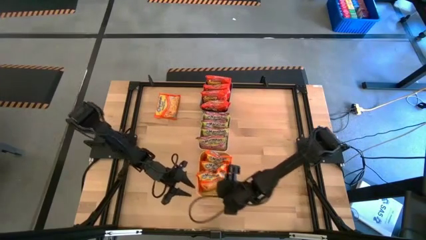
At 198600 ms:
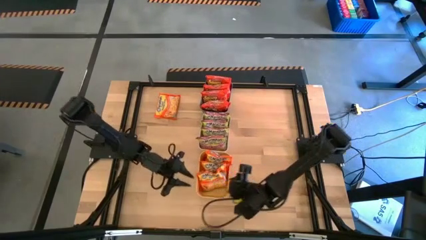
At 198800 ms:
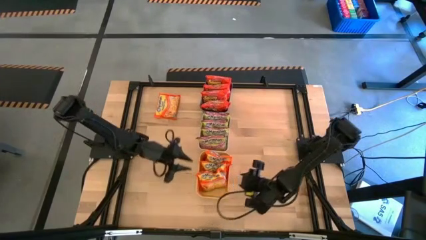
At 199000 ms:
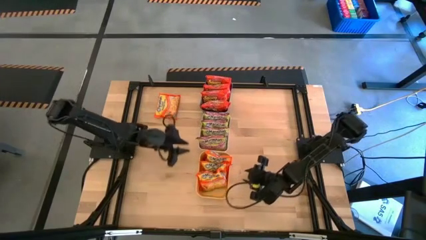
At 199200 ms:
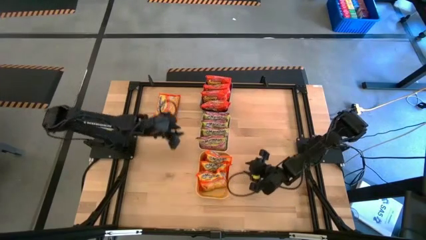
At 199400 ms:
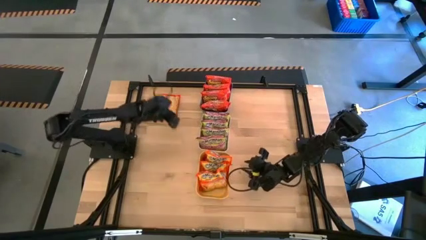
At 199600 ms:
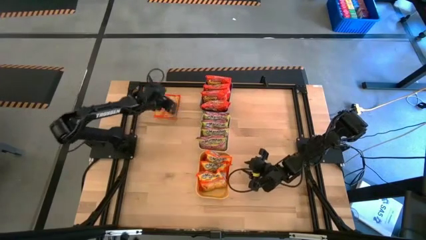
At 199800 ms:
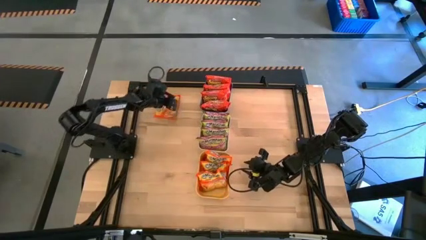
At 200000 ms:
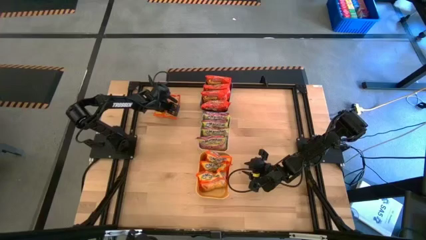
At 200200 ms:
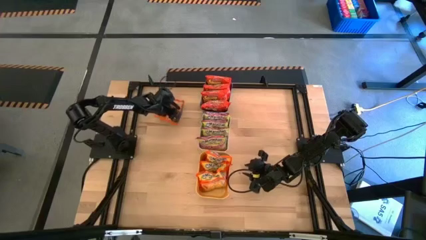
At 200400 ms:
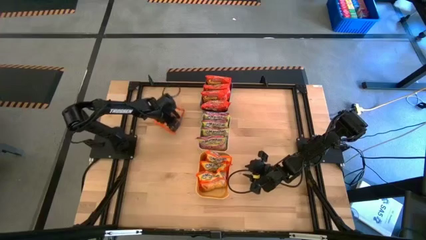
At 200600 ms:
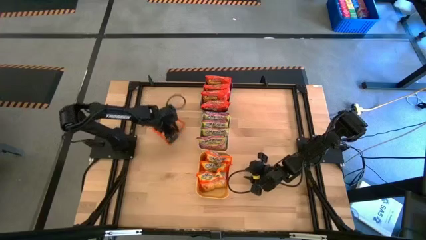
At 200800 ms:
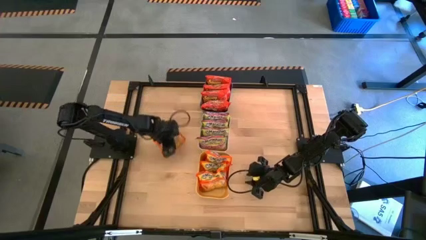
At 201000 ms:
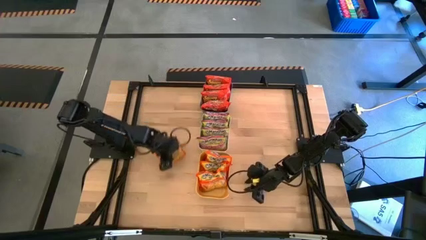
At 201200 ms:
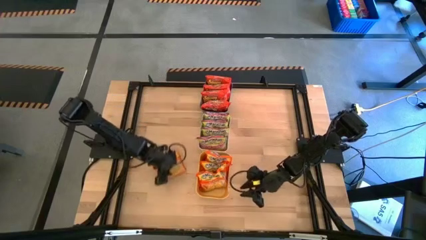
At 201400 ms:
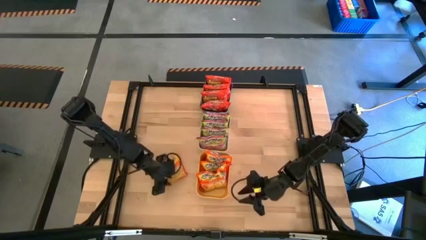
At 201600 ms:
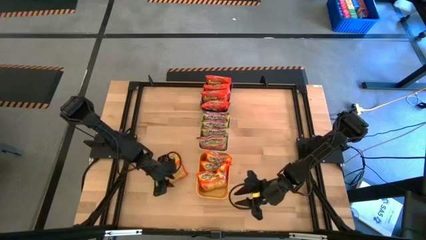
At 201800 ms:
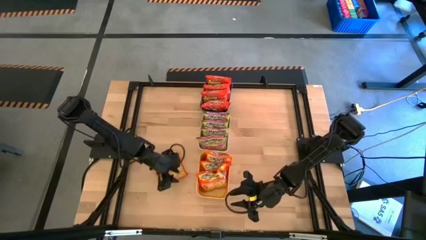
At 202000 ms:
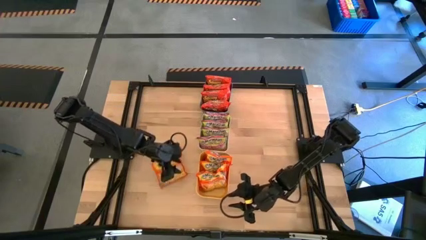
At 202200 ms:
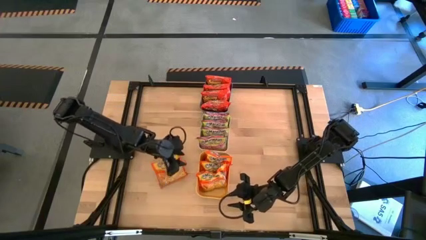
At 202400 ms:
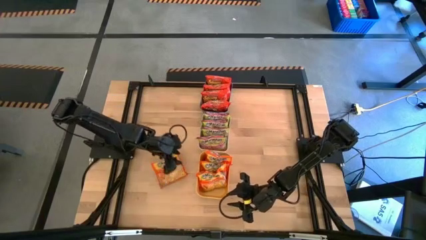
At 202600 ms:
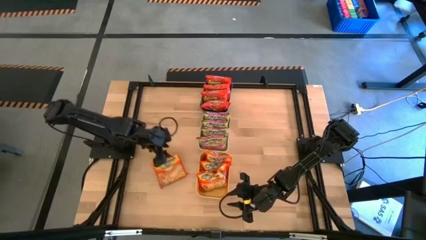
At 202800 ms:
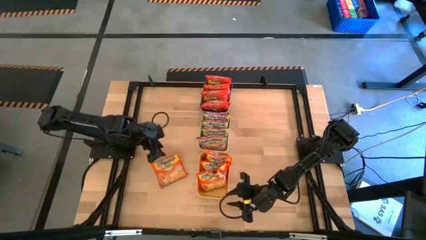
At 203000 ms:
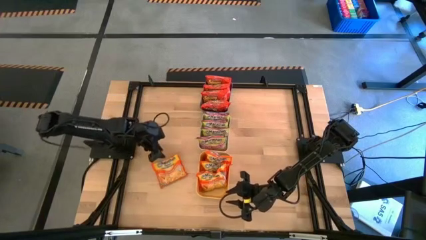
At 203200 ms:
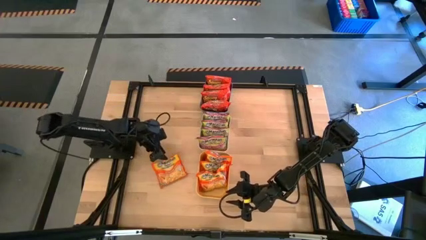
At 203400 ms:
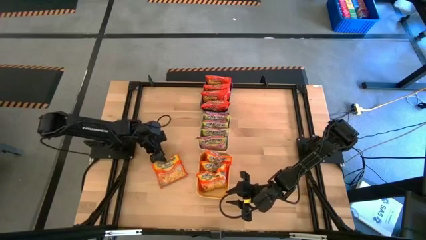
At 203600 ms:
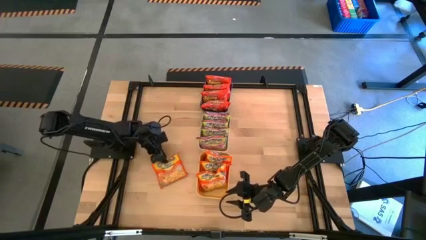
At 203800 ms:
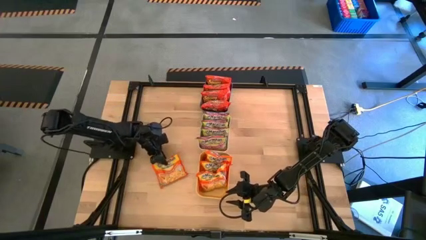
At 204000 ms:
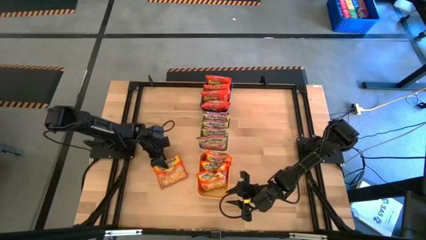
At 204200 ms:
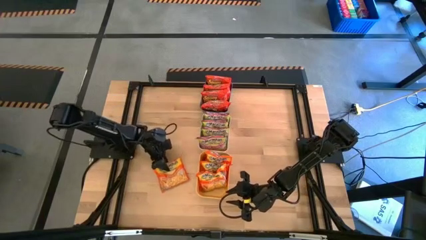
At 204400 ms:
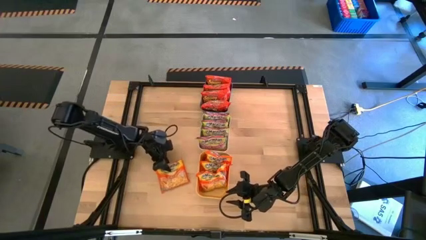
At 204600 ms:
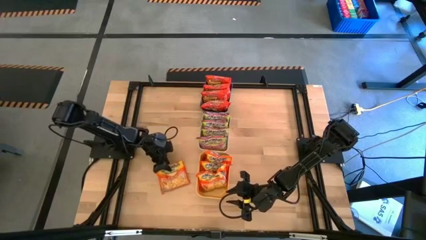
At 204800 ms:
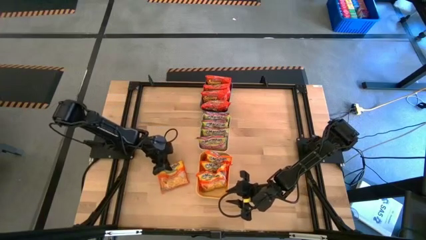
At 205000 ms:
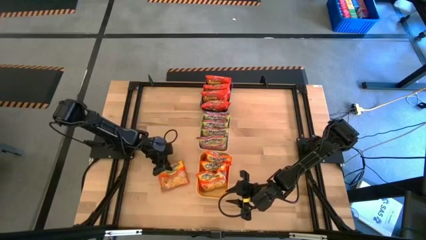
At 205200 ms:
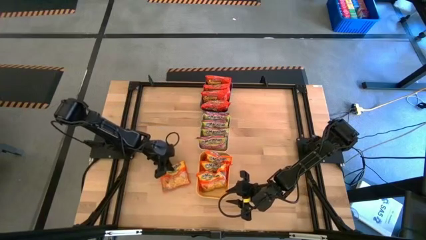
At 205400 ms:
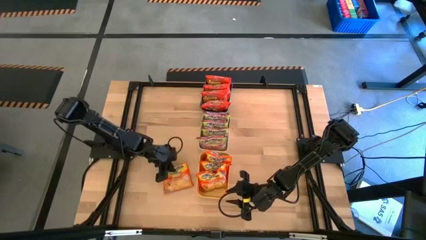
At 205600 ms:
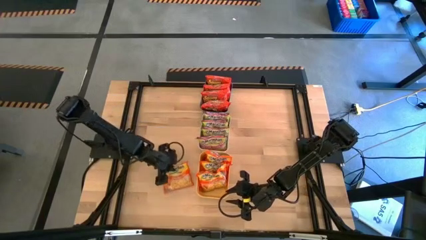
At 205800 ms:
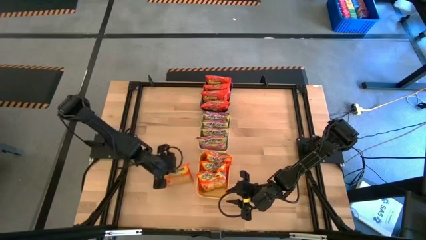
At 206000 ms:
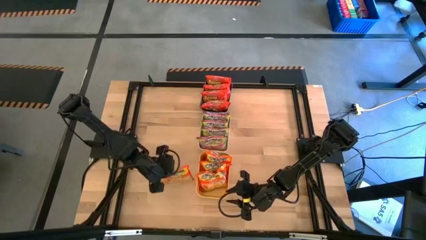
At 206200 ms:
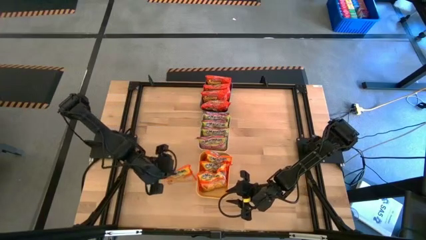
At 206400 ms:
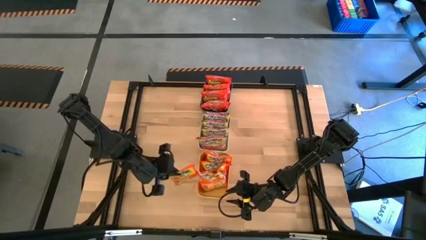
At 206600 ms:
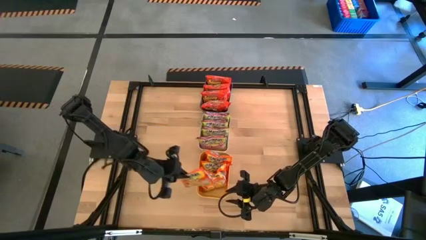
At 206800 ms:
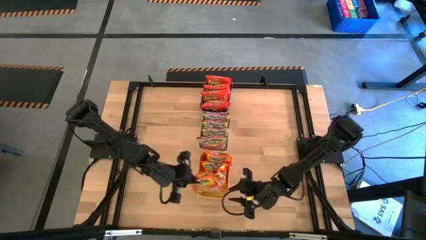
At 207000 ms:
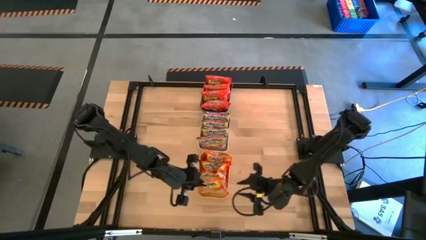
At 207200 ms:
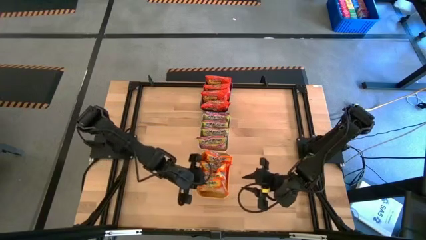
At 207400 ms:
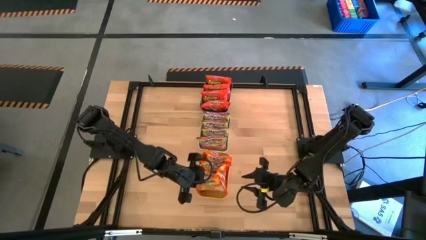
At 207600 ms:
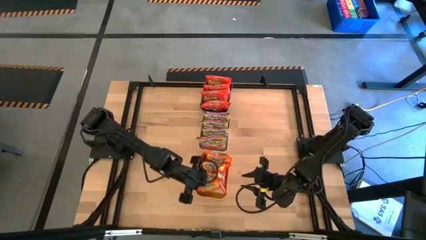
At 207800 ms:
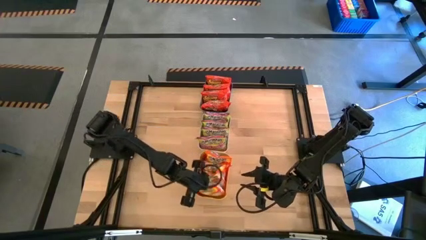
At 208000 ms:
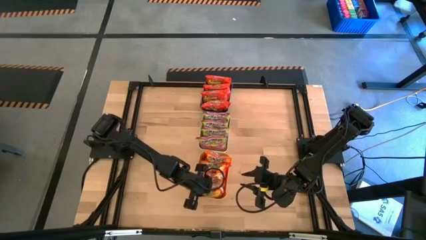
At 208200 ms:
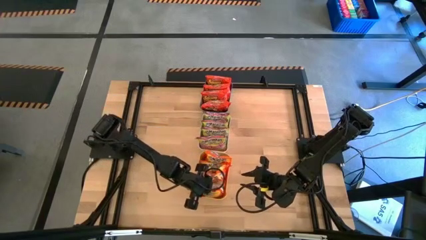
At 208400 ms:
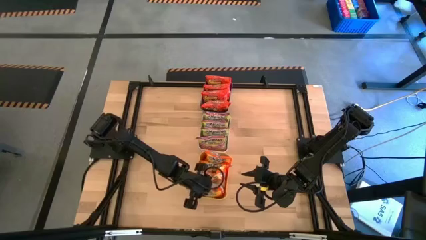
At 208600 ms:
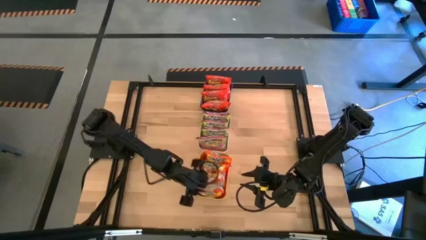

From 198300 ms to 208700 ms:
Task: Sort Maruchan noodles
Put the orange noodle pack into the yellow bin

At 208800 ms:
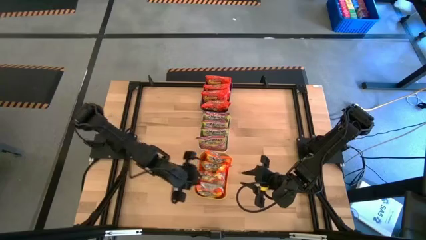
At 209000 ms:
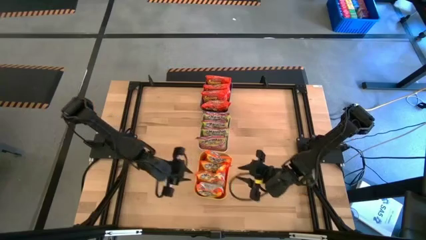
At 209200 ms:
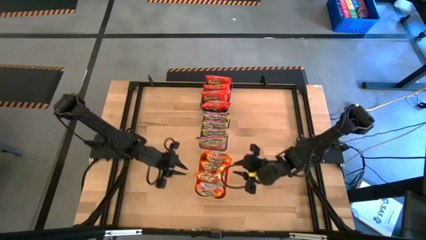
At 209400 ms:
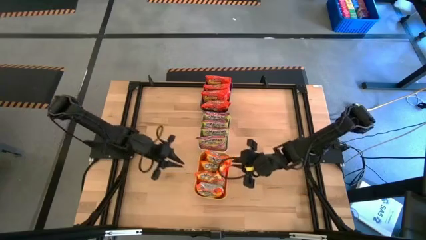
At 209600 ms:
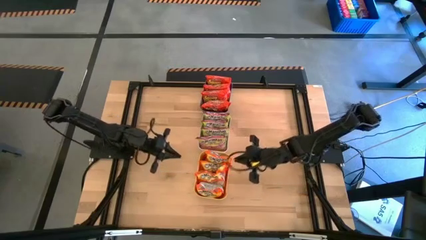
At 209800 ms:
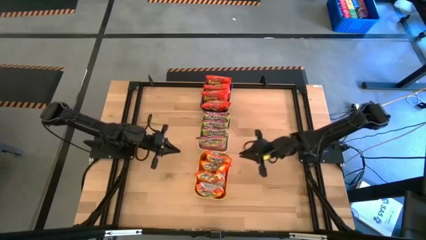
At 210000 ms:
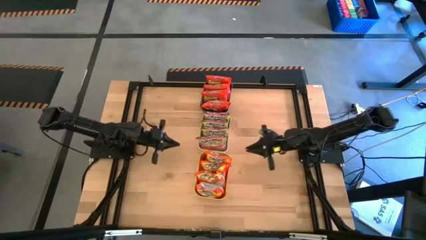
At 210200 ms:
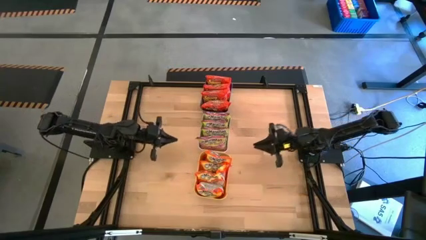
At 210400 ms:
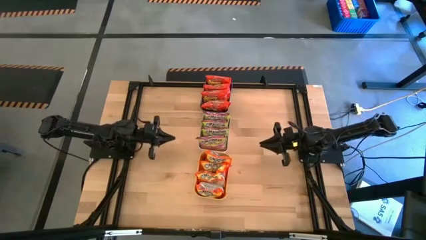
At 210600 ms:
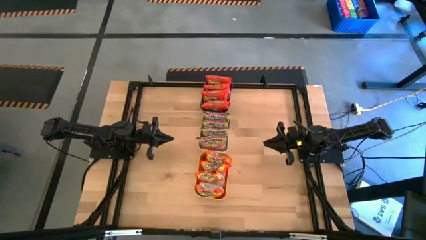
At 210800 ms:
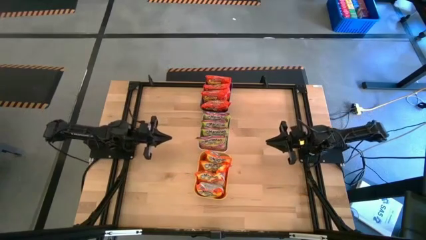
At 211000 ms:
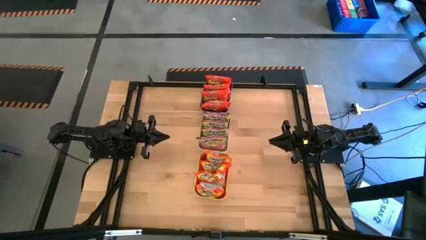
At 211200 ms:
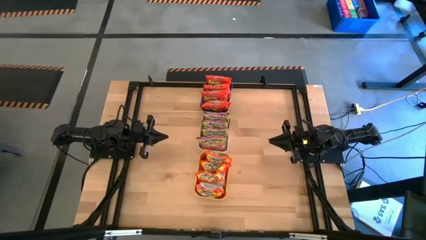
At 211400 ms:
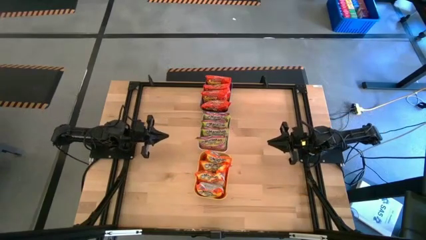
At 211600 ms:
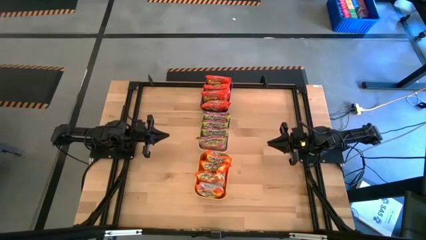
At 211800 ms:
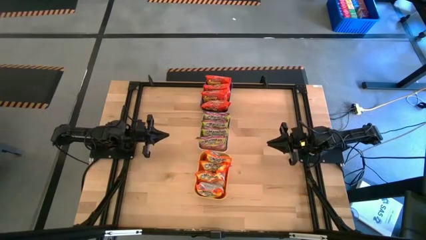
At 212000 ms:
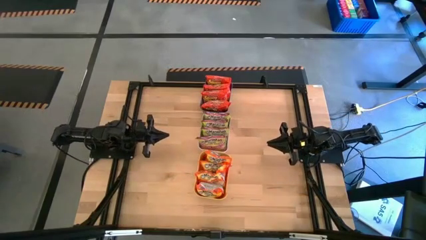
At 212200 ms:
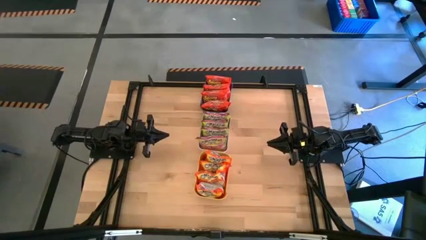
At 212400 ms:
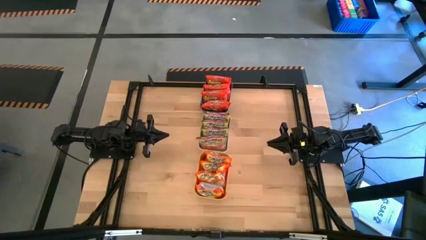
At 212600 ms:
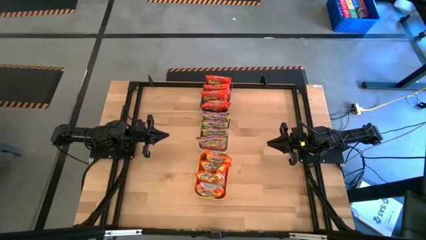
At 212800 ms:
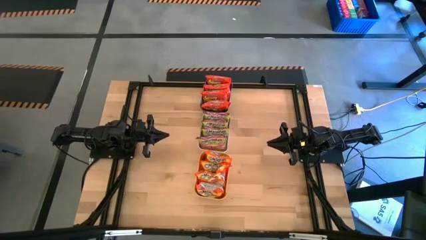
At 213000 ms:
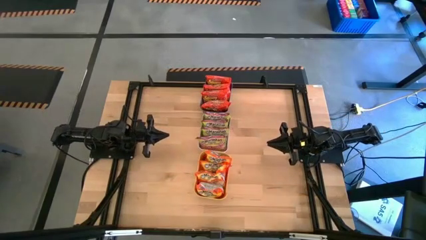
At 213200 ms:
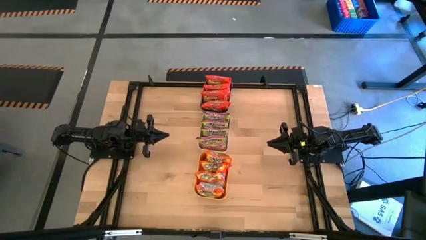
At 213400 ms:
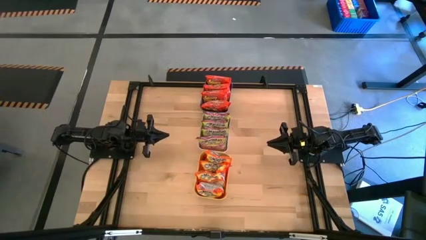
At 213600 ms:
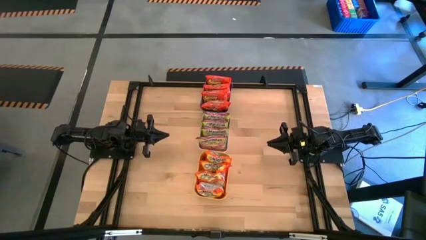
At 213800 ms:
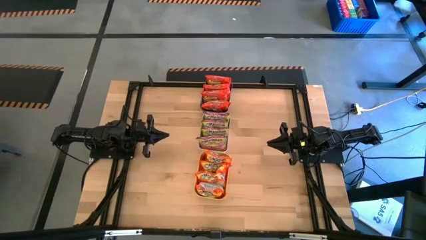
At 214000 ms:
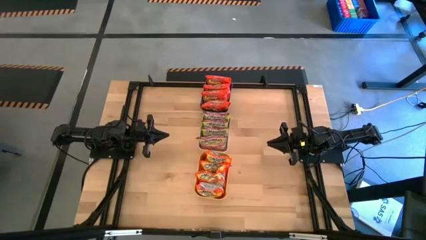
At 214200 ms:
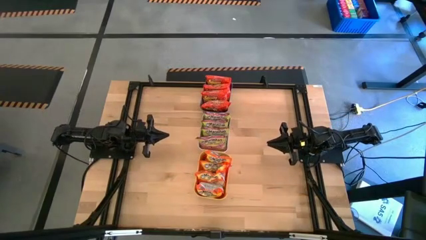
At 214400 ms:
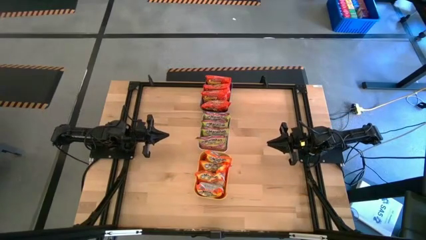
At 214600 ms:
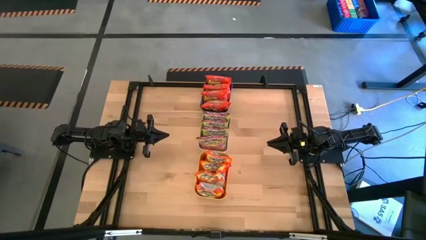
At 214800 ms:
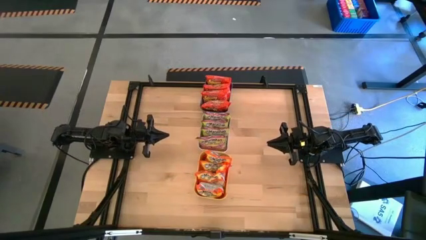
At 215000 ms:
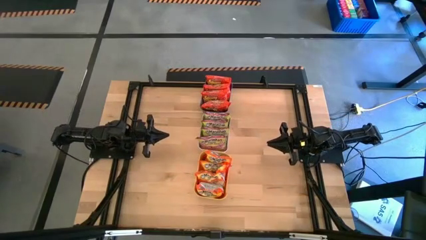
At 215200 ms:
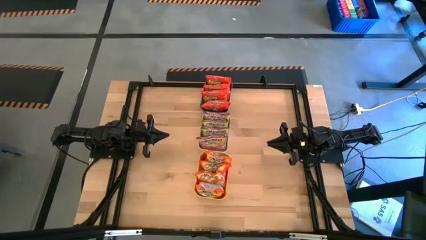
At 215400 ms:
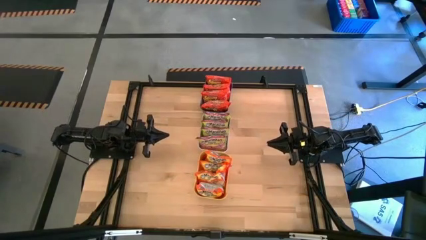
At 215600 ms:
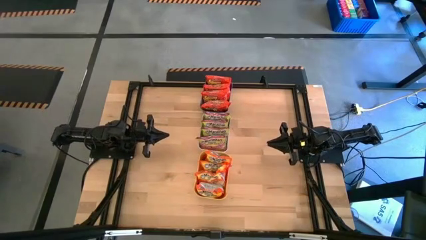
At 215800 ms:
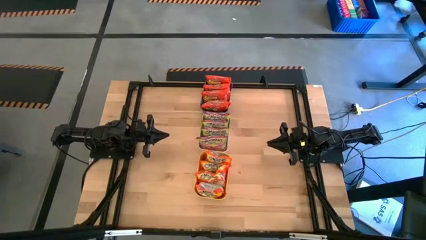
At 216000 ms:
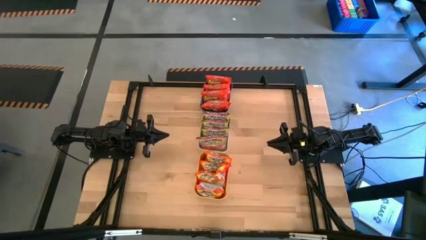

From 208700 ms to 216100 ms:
Return to Home Position
